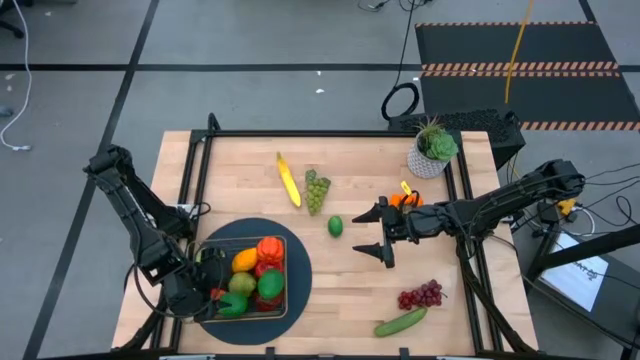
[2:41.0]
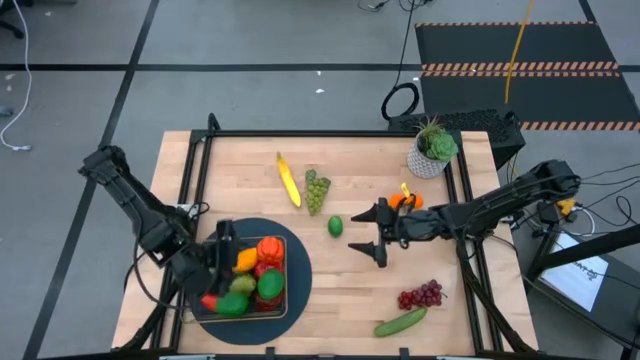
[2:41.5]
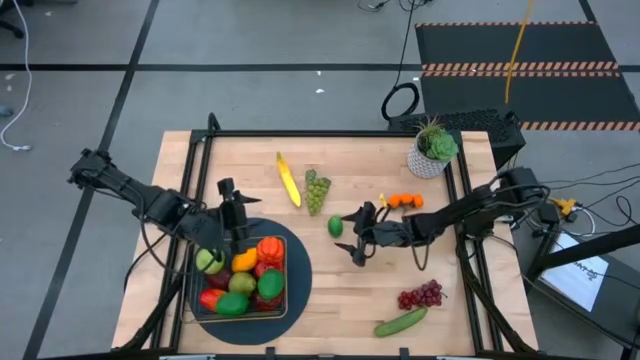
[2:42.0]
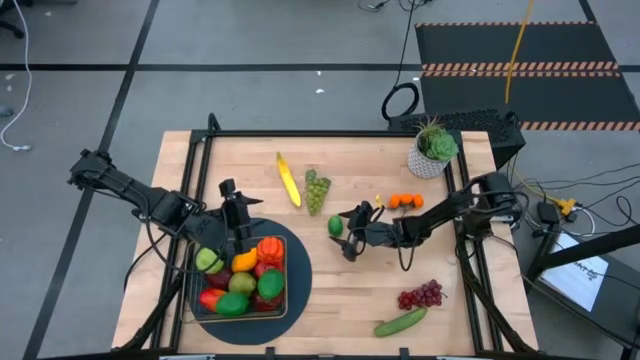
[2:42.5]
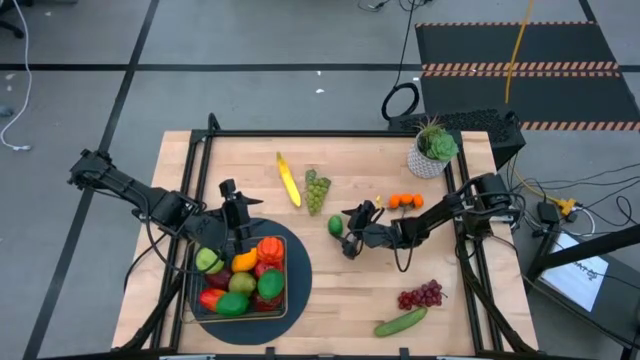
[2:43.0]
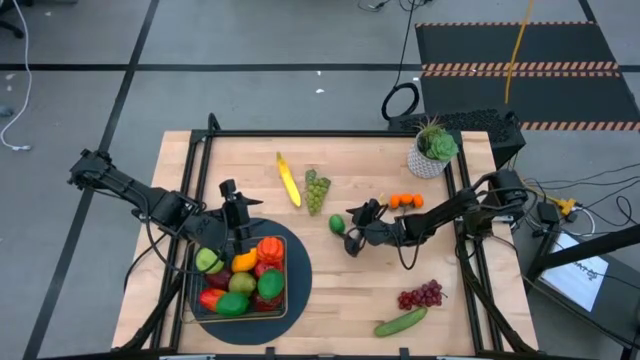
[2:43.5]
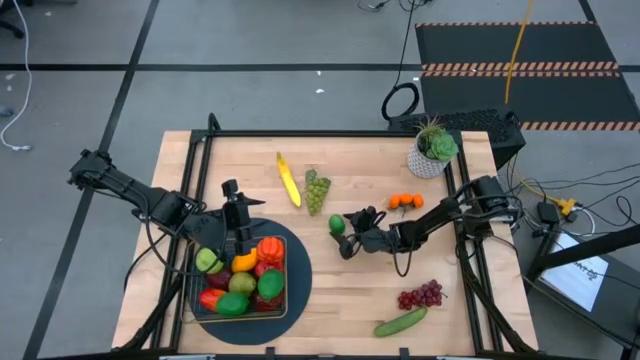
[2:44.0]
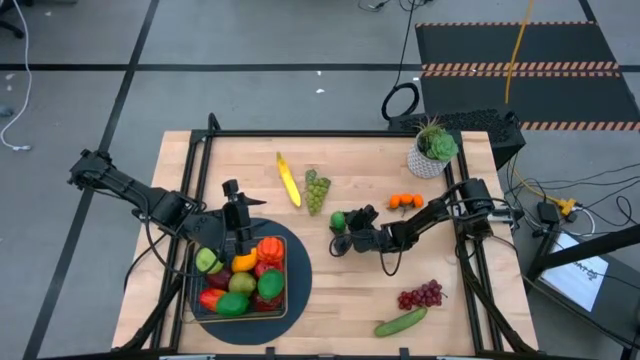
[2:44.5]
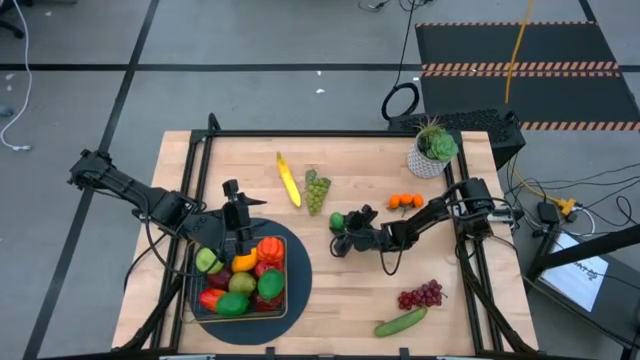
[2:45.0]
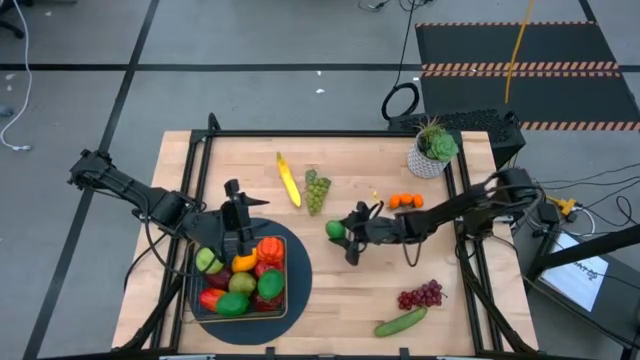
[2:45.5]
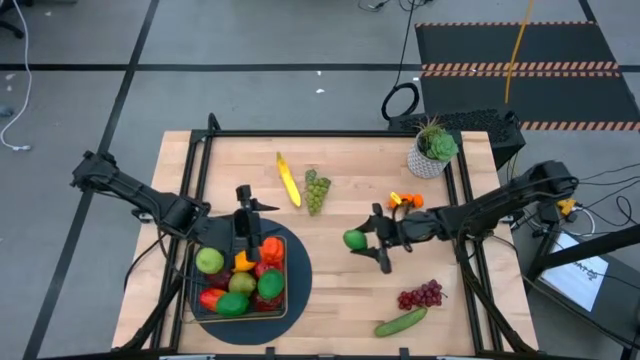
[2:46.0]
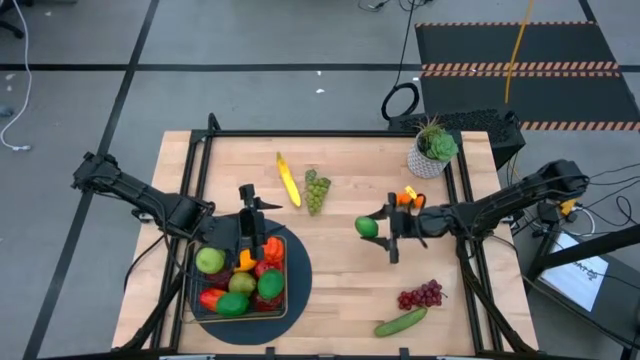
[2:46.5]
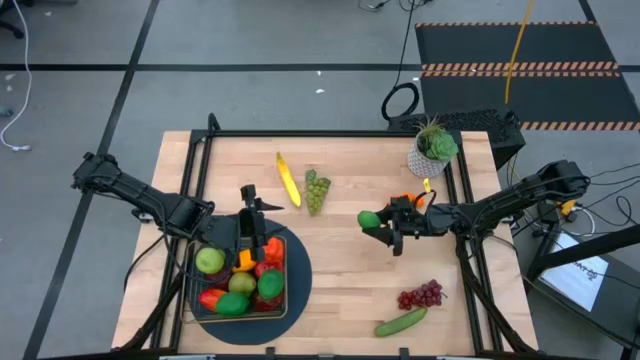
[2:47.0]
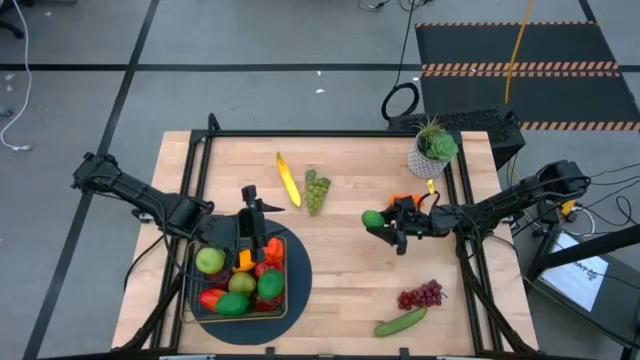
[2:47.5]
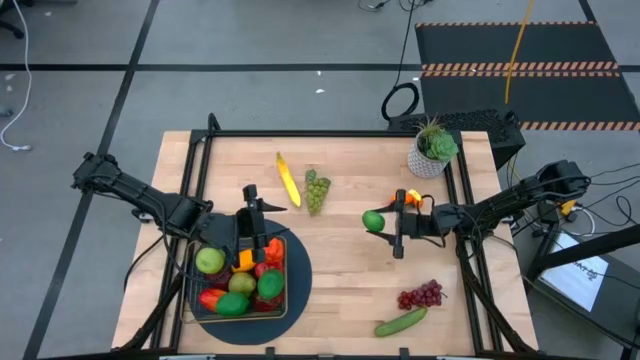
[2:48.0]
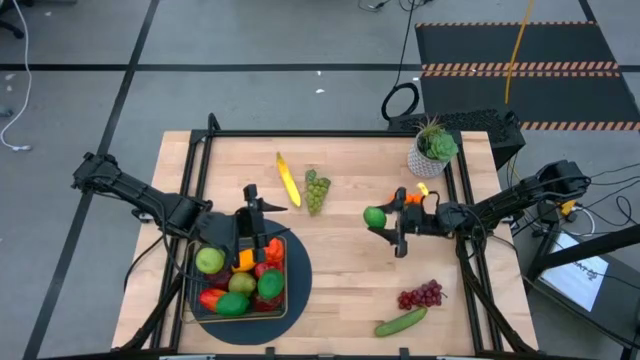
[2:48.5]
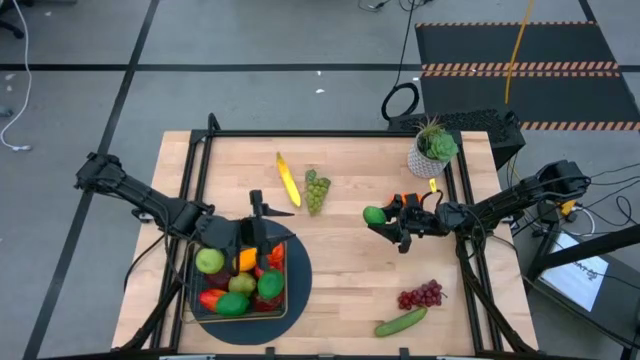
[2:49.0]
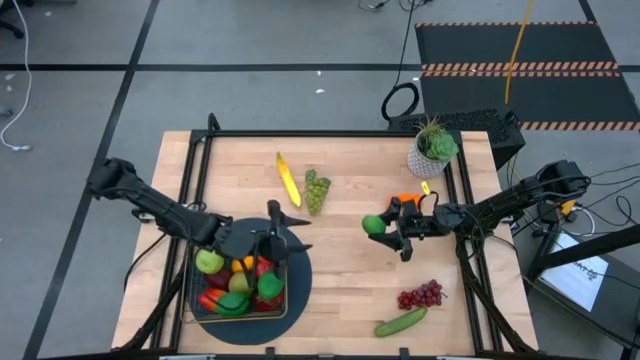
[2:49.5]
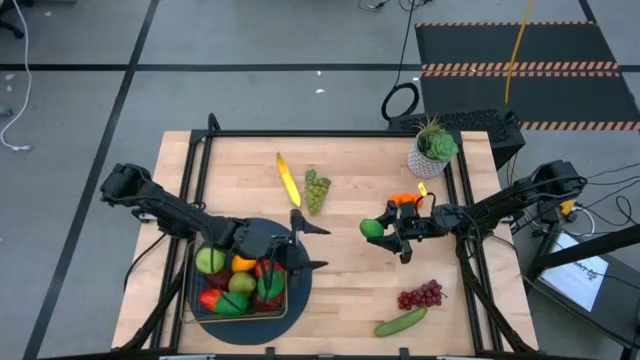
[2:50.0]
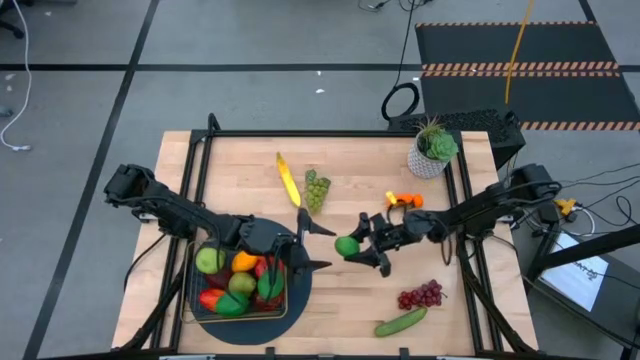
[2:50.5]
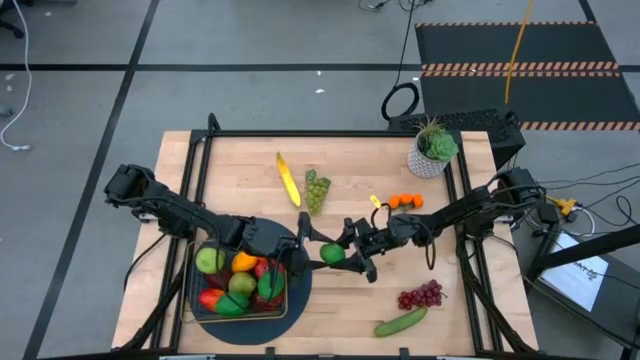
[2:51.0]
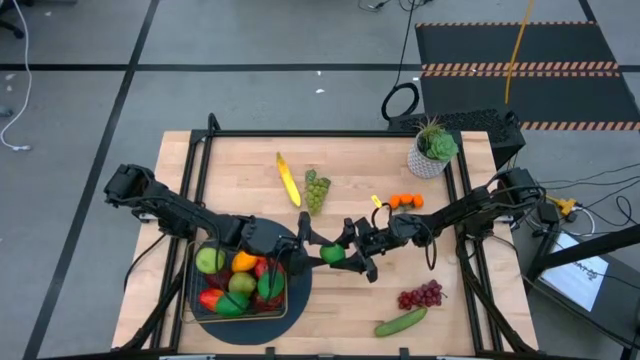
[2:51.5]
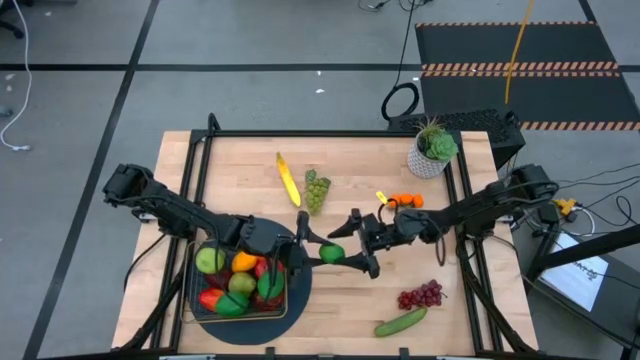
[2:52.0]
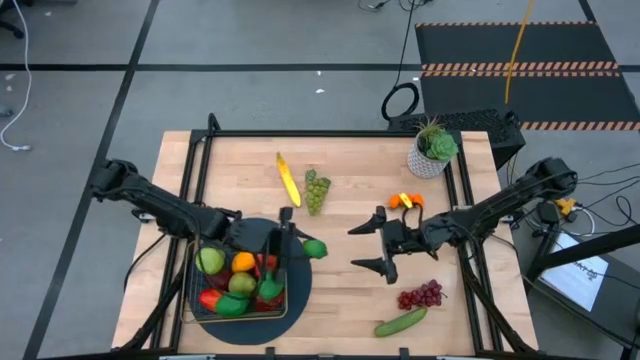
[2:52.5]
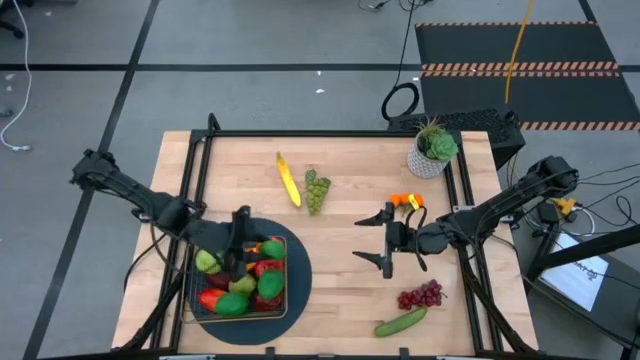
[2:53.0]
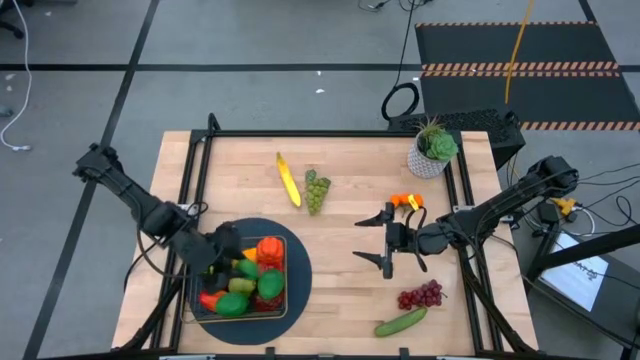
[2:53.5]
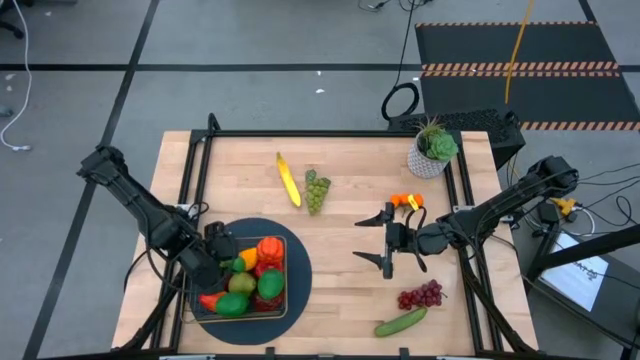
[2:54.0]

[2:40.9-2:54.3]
Task: Build produce basket
Put the lime into the gold wire basket

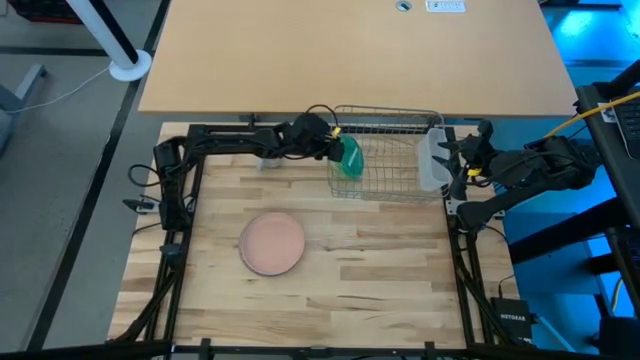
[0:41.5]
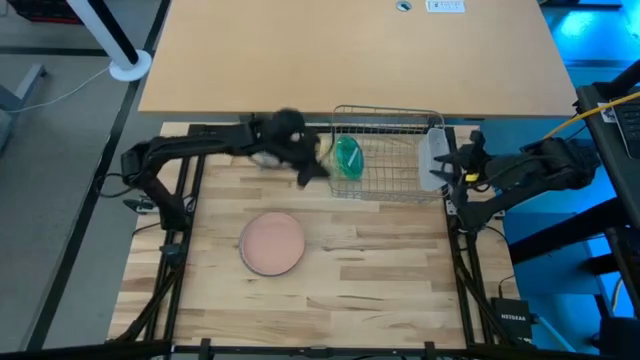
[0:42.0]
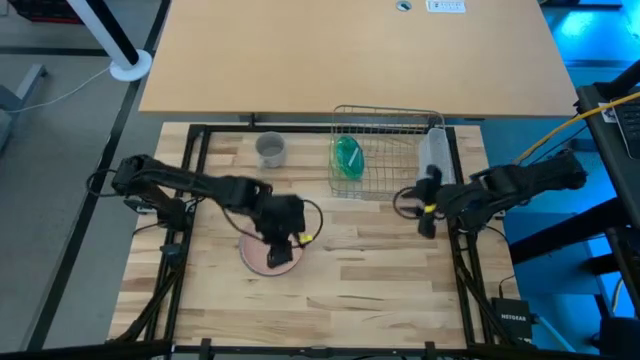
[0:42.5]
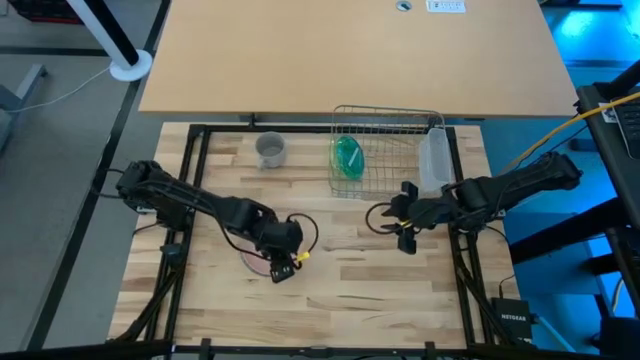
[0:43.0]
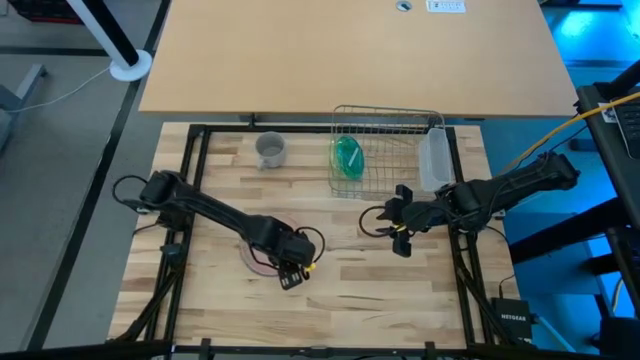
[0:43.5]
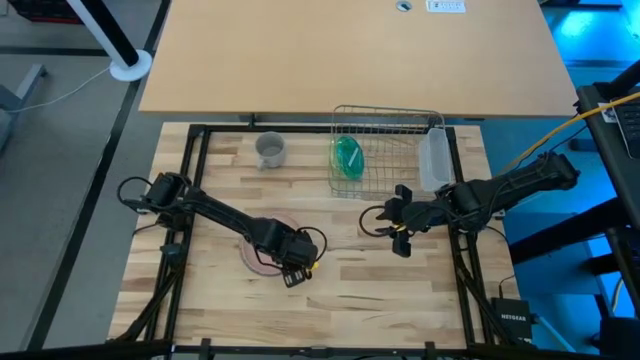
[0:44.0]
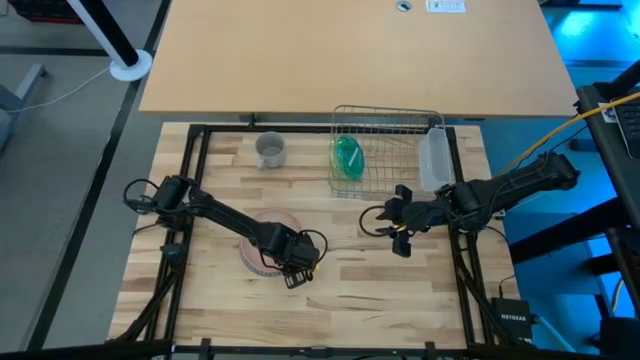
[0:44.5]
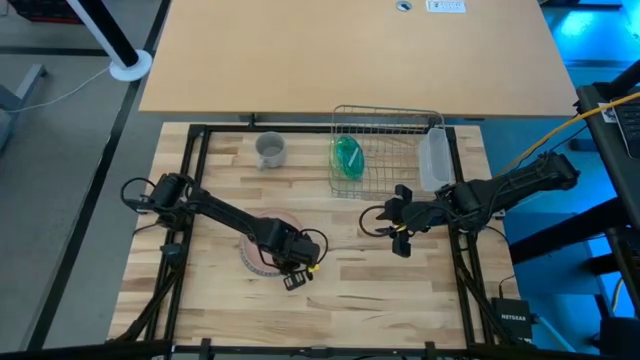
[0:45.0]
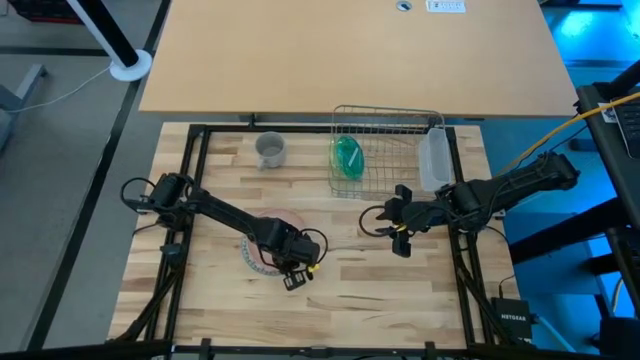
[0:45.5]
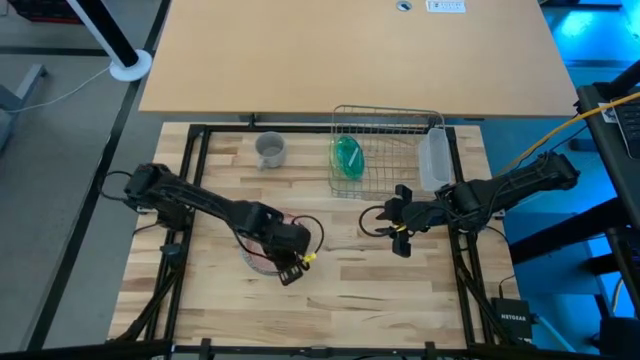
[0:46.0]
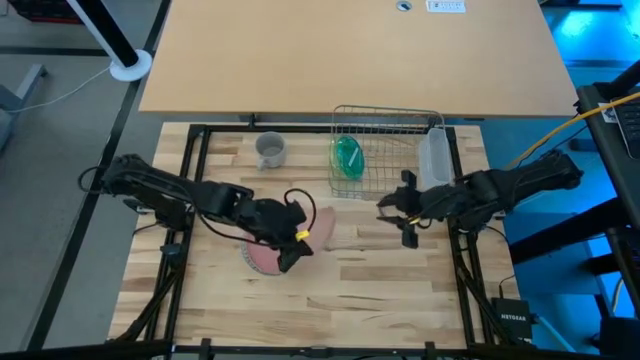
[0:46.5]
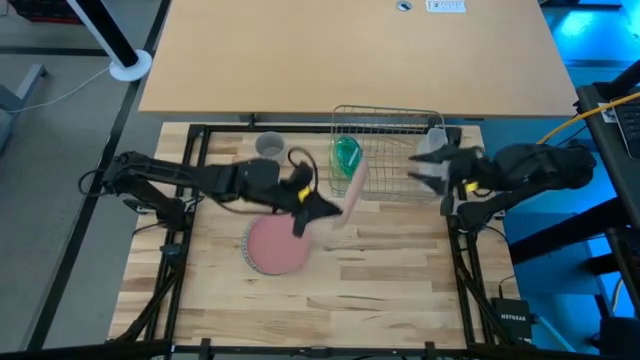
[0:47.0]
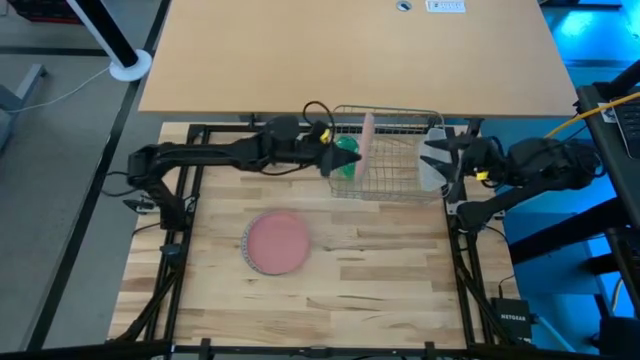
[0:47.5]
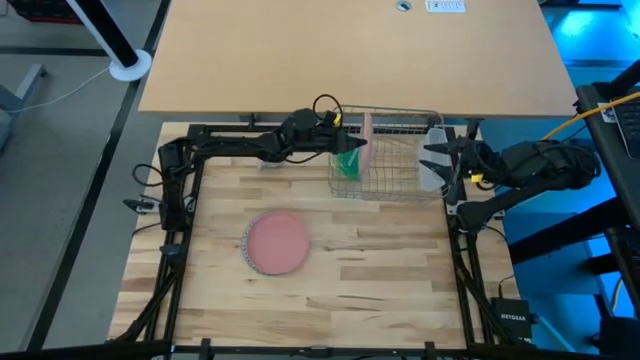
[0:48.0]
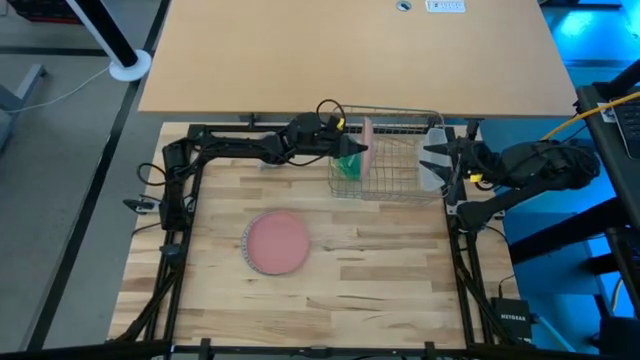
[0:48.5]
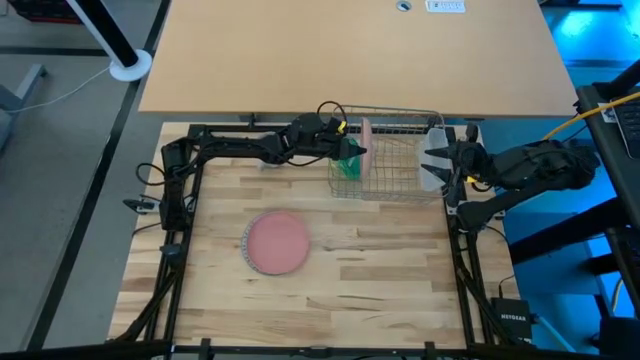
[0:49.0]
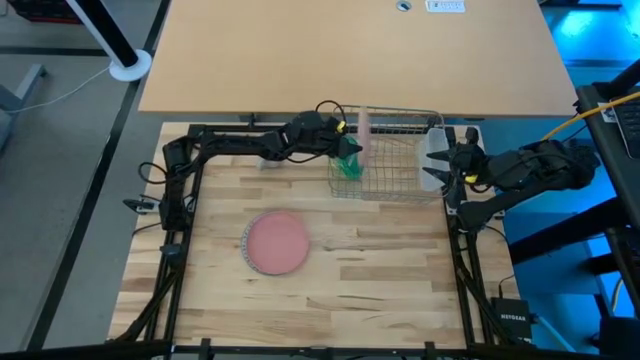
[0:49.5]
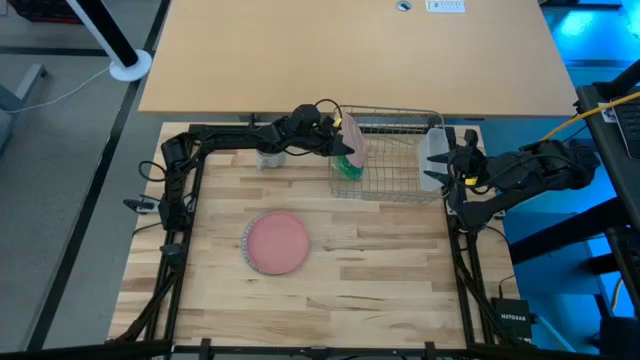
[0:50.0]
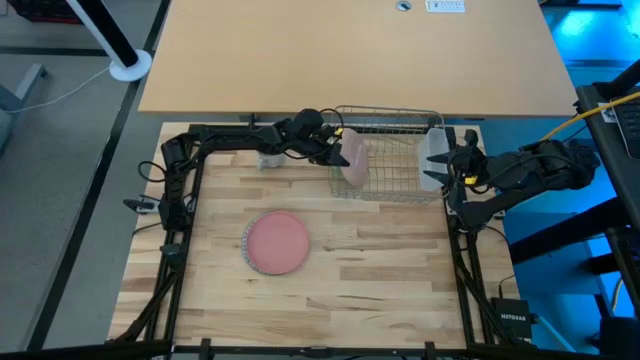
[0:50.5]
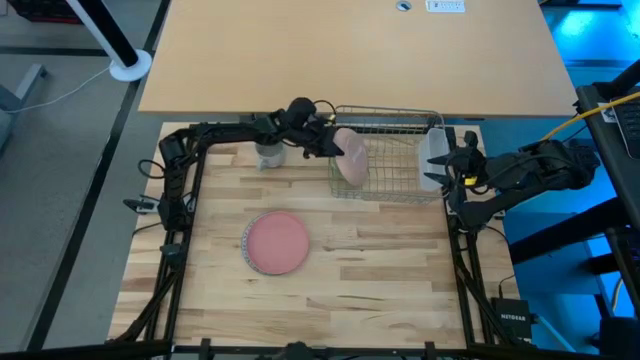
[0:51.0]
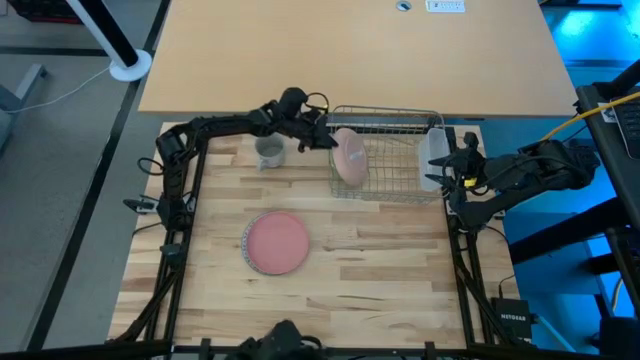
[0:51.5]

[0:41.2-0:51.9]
Task: Sort dishes
Put the light pink plate into the dish rack
